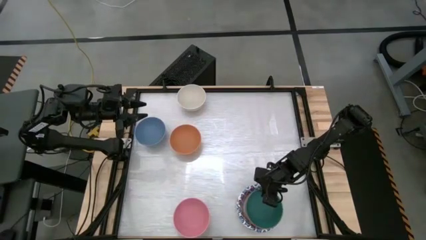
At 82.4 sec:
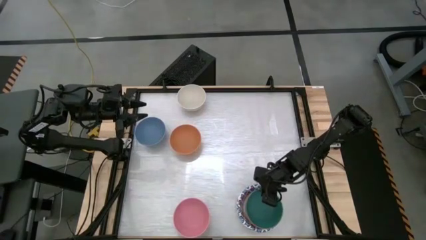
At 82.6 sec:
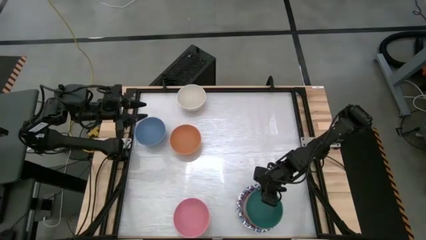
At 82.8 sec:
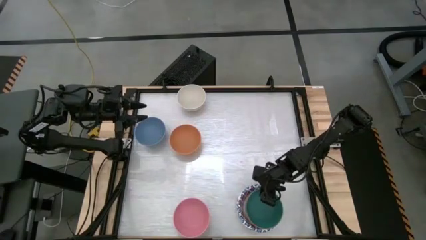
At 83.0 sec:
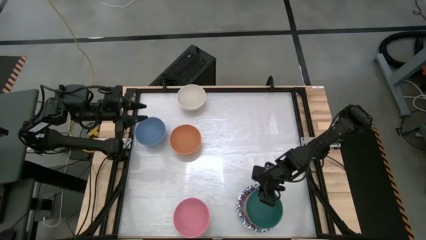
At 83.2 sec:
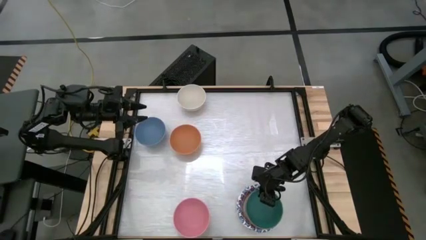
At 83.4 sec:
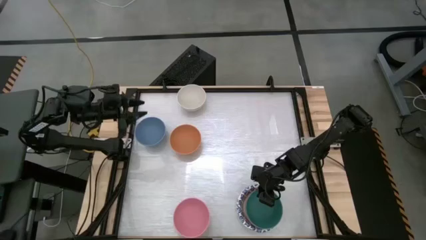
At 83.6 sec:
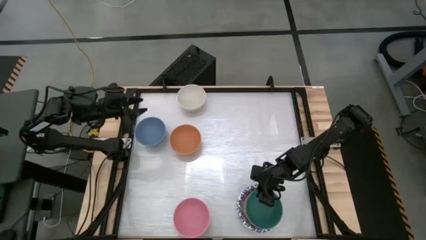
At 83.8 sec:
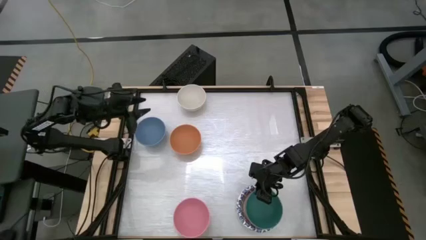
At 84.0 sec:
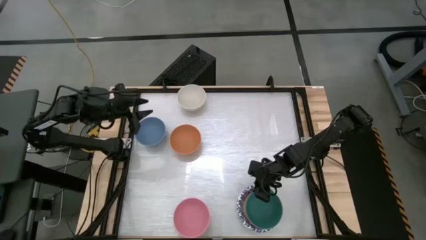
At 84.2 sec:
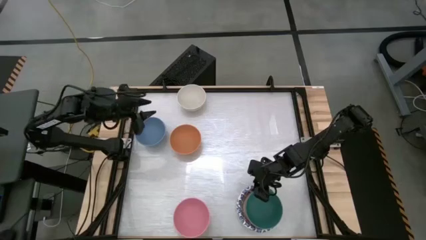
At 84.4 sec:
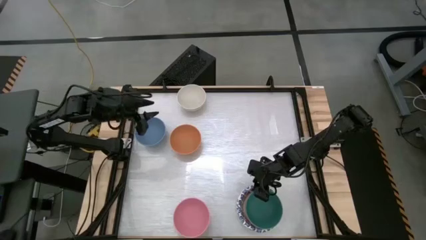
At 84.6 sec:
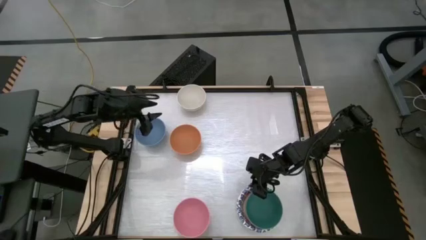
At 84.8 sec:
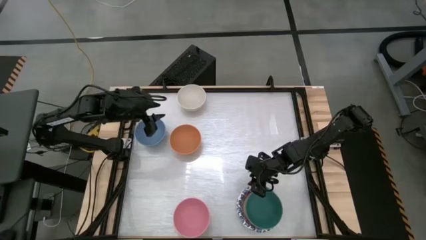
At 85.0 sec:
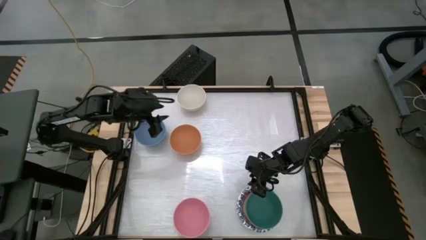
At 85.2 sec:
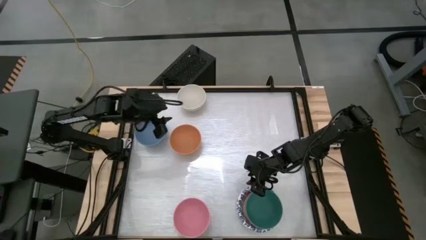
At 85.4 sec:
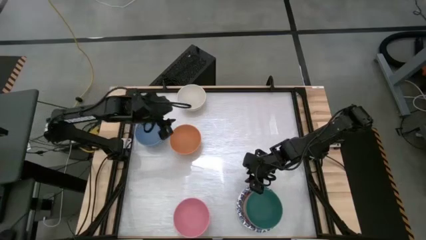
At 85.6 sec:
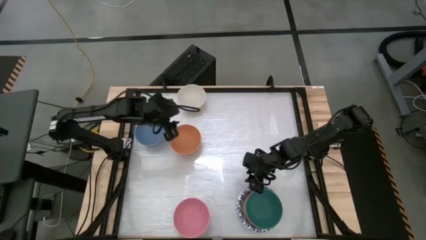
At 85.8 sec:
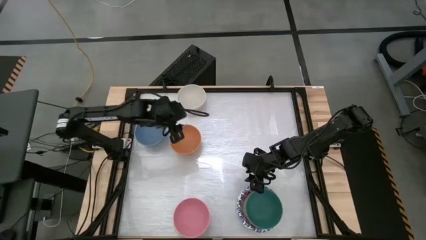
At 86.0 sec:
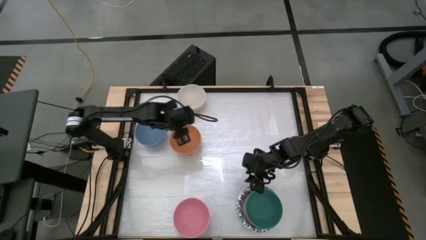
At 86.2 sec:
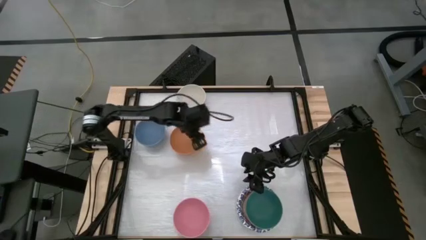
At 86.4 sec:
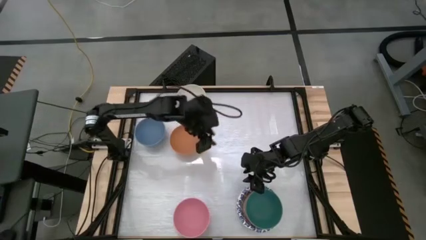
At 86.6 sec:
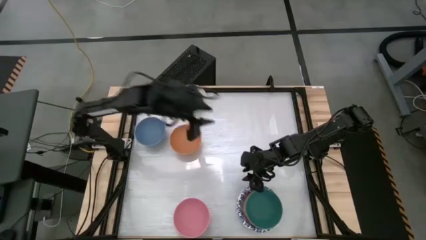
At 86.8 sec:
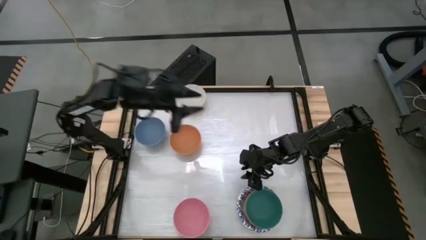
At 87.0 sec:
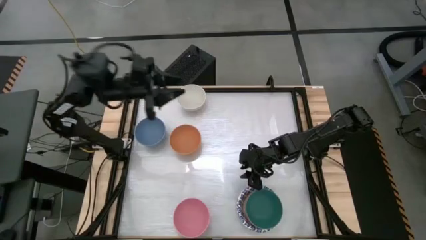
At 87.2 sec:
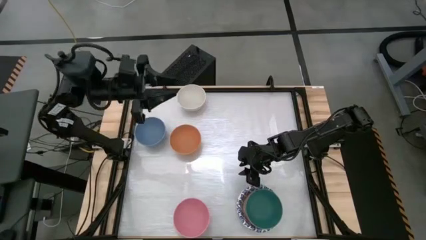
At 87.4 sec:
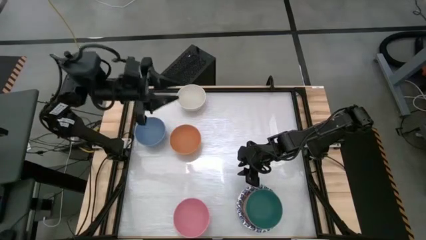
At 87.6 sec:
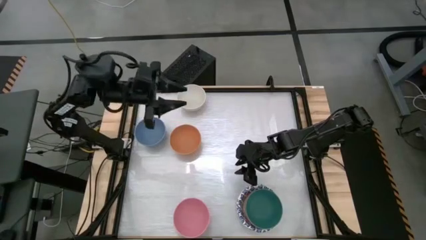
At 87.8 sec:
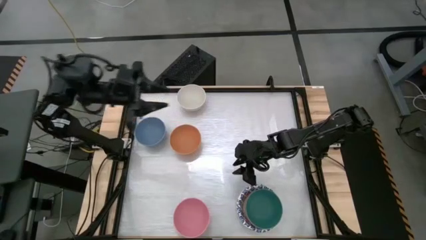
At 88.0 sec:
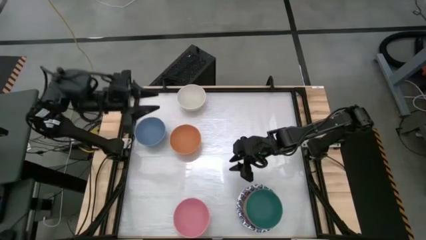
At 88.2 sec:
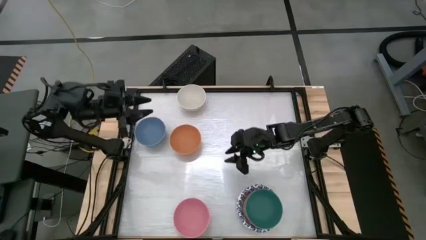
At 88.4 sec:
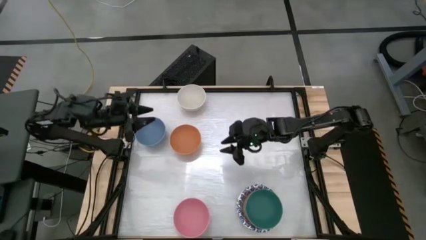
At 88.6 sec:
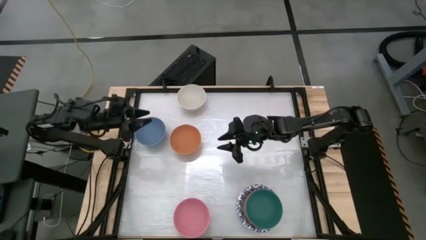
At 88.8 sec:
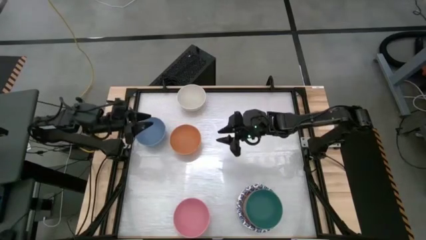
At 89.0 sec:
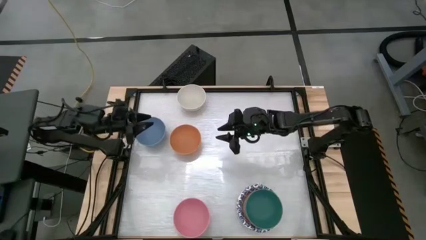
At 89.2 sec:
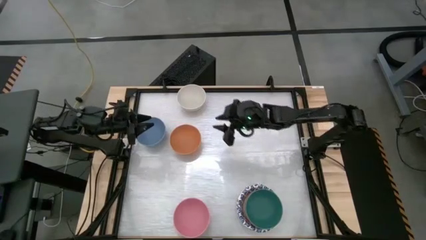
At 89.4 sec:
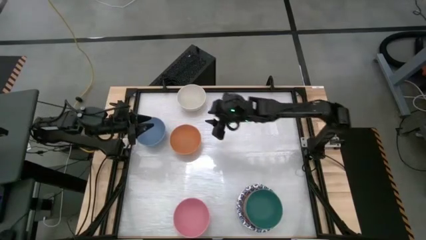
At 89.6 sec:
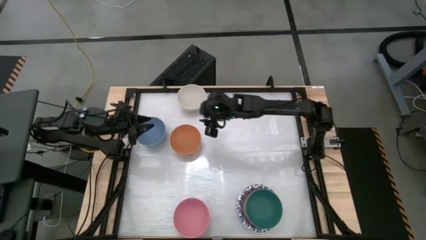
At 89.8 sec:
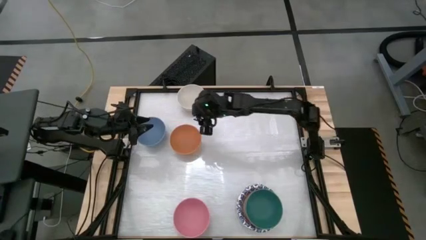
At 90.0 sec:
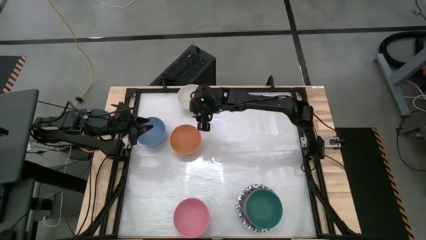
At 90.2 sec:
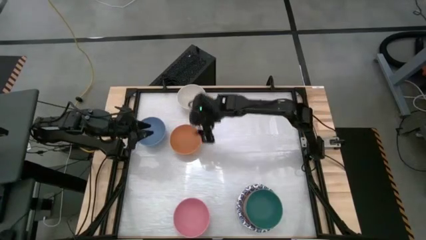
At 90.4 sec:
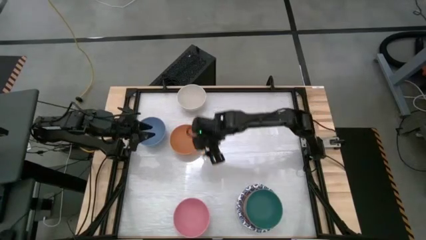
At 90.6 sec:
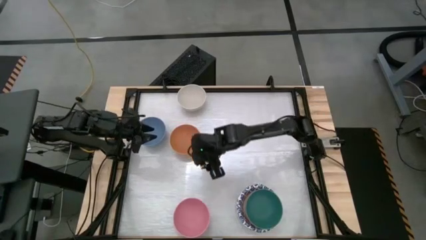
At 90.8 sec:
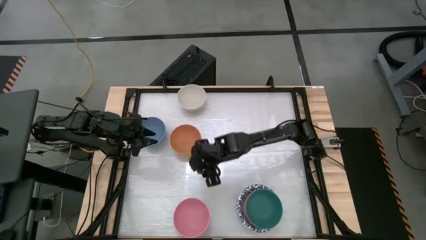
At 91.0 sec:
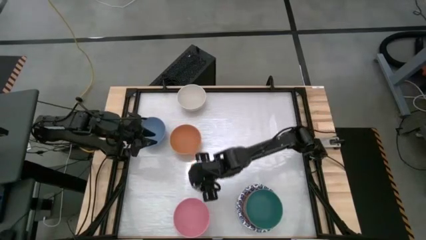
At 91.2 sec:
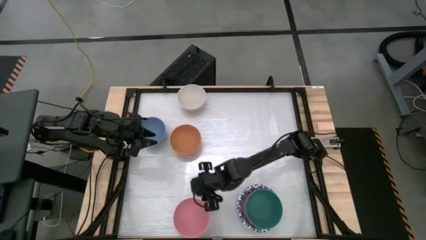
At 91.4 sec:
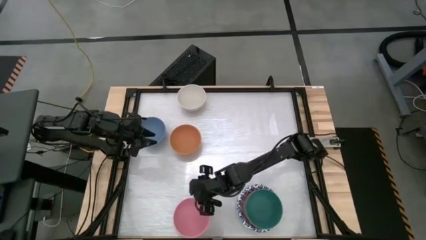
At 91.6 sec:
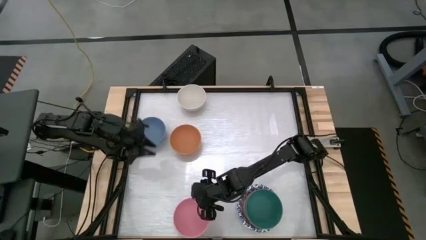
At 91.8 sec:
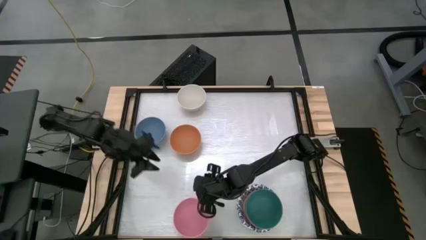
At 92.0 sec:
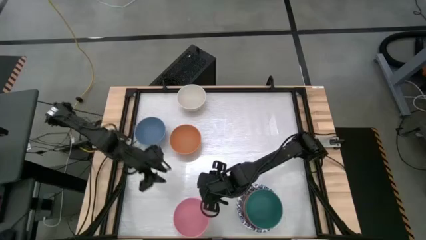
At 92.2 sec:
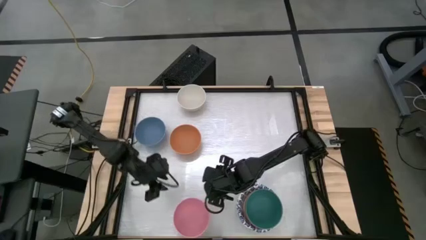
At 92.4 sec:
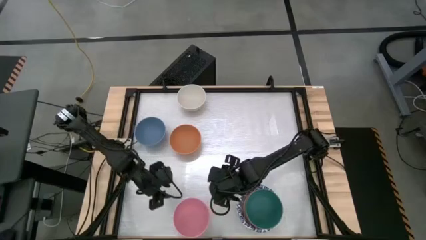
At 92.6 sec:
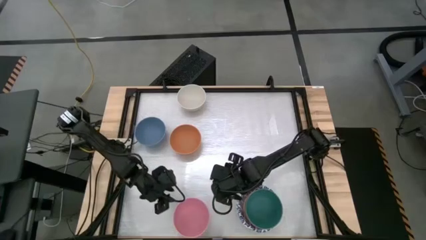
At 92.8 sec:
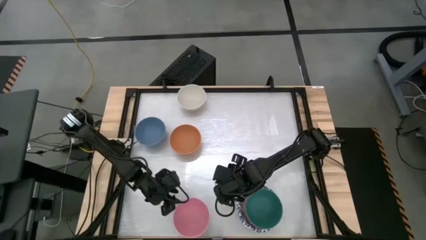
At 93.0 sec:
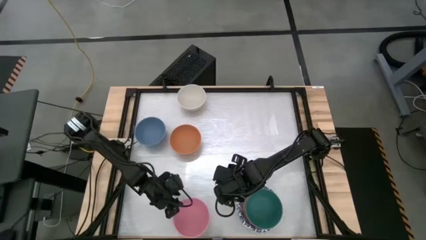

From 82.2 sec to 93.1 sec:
Stack the pink bowl on top of the other green bowl

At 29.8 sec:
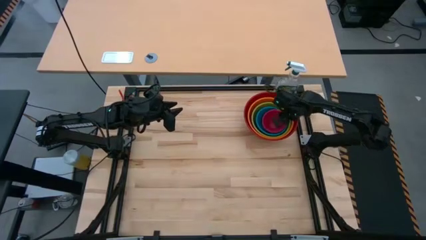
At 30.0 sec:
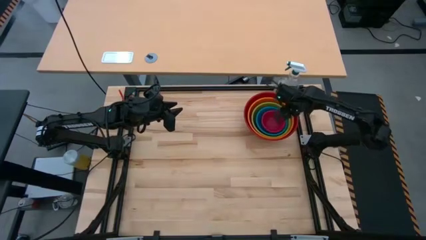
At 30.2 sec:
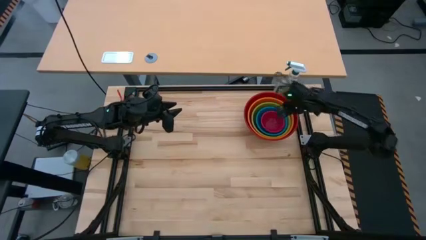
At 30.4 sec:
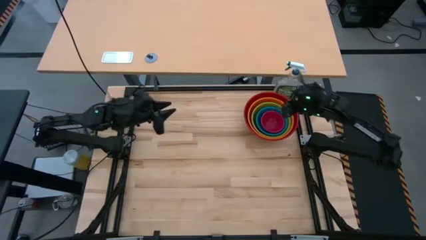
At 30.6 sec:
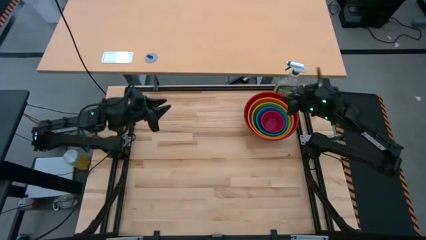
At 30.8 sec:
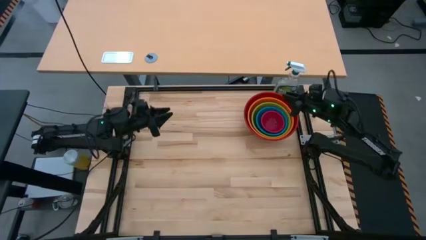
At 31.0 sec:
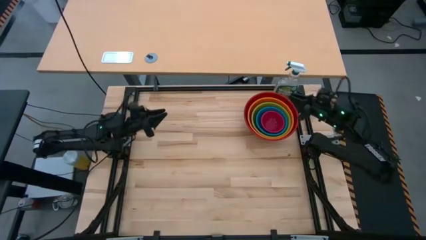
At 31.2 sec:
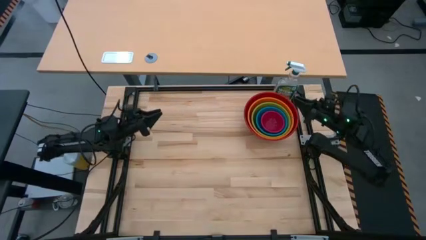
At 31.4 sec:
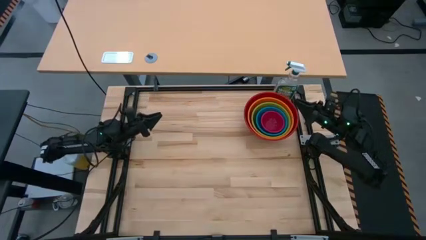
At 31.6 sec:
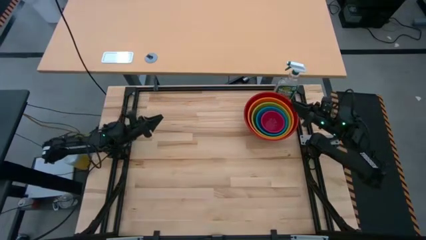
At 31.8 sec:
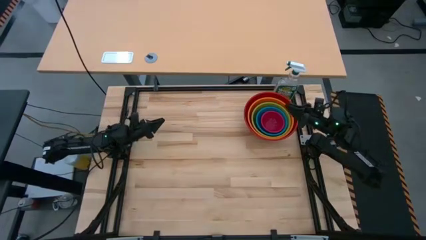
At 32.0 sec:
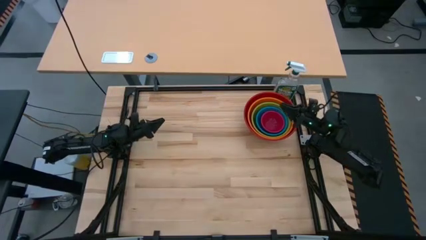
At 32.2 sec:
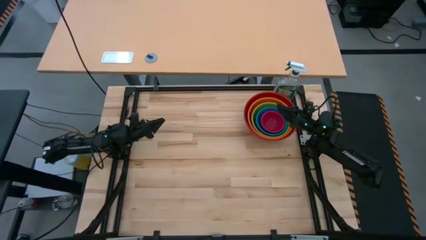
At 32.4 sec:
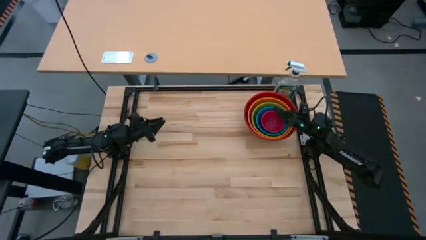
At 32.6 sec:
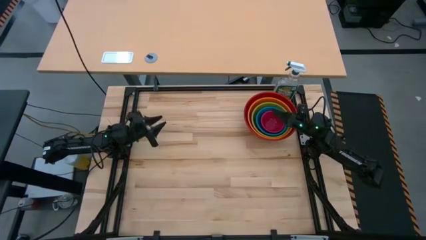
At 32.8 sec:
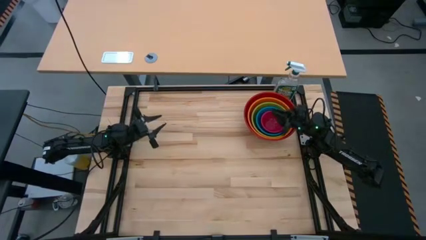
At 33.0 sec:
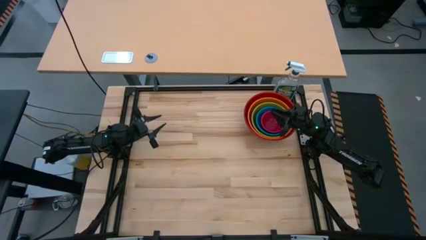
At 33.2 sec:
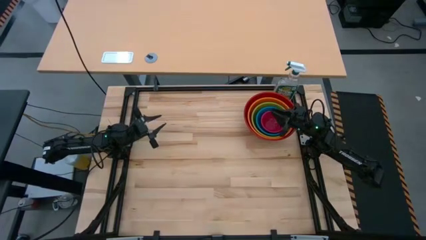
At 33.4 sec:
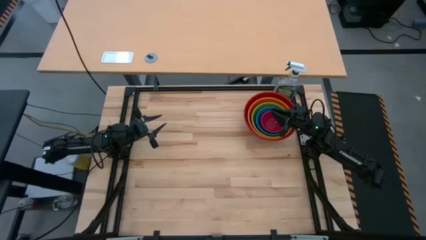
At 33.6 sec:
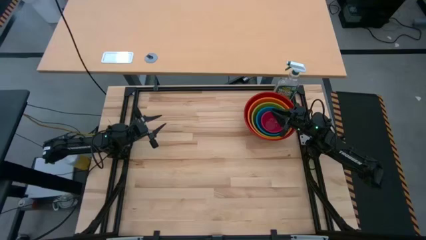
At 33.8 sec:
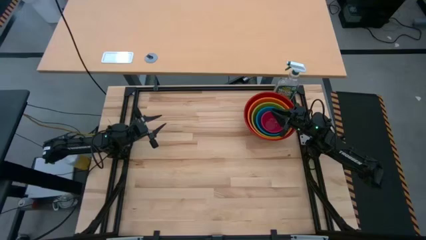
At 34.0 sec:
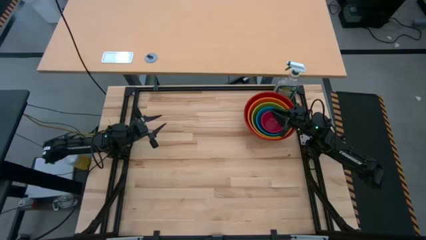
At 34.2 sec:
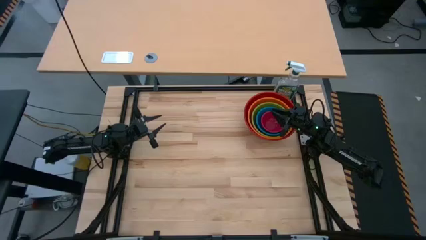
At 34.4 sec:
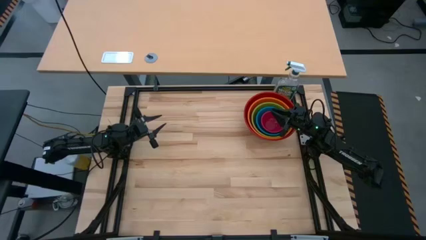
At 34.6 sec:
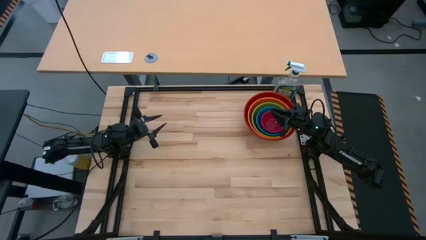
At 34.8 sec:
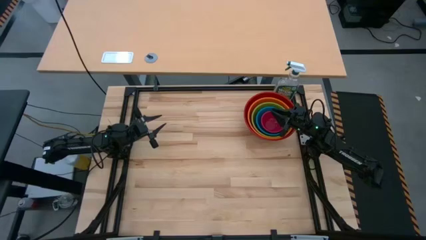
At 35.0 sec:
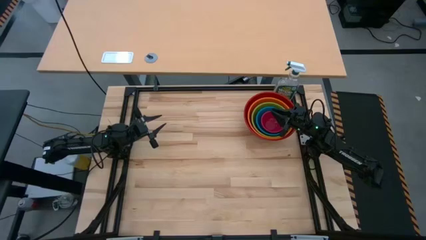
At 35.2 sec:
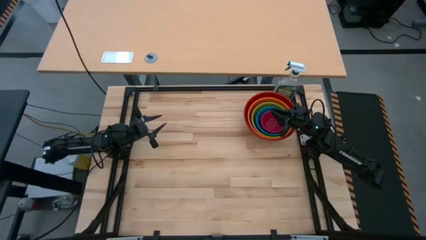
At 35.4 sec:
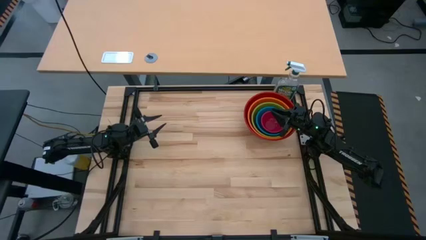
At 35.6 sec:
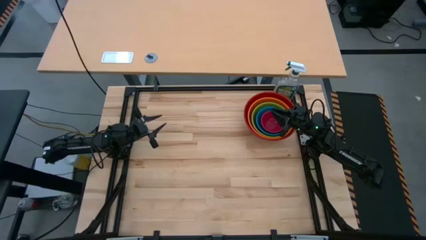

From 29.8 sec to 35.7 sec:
Return to the home position
